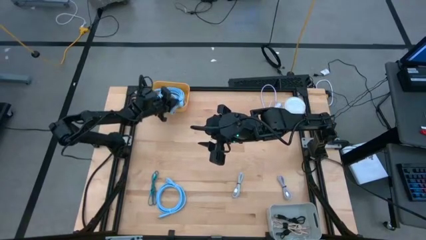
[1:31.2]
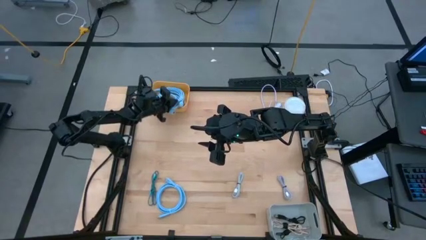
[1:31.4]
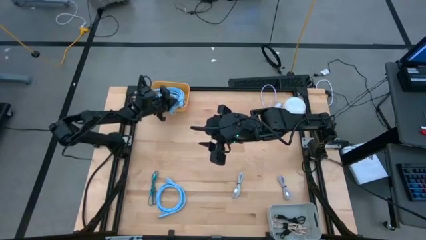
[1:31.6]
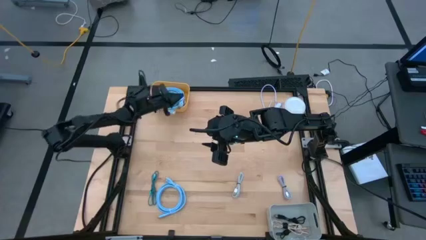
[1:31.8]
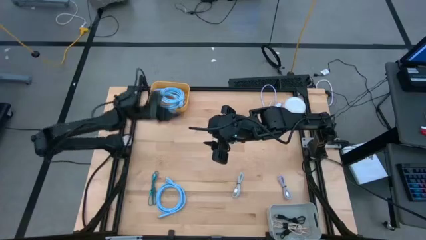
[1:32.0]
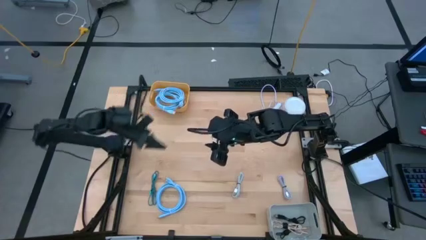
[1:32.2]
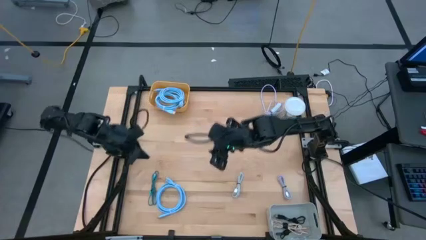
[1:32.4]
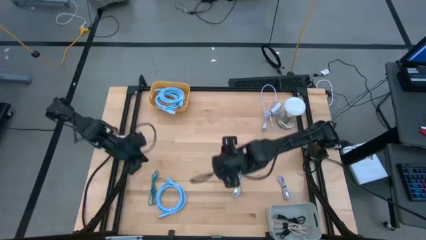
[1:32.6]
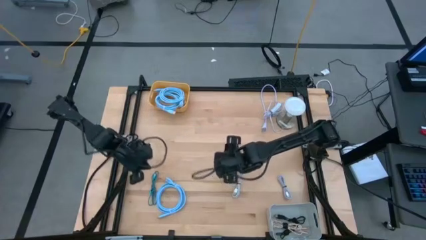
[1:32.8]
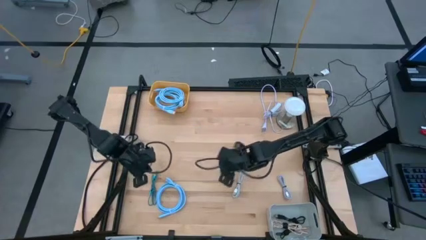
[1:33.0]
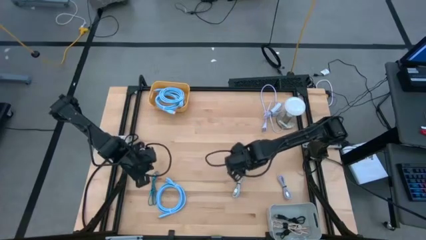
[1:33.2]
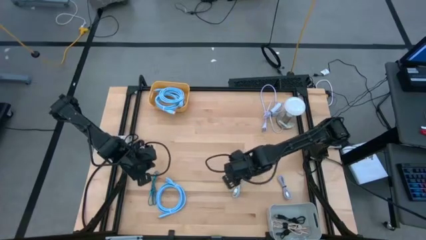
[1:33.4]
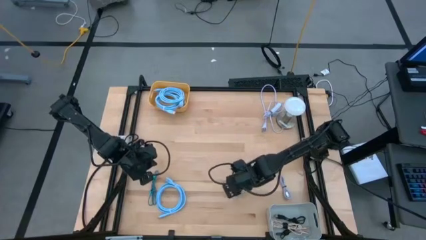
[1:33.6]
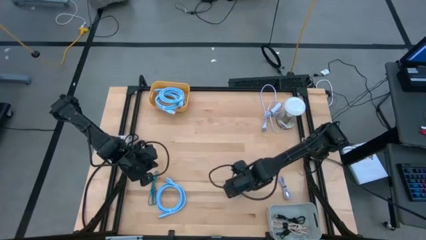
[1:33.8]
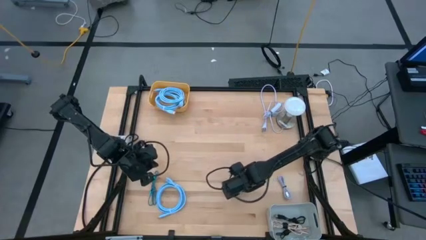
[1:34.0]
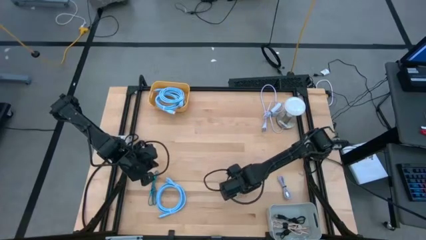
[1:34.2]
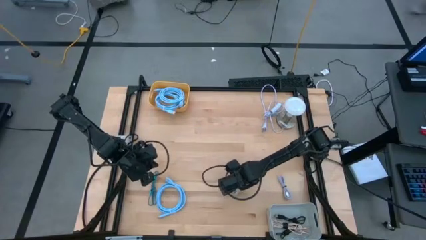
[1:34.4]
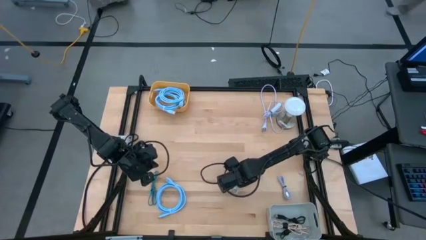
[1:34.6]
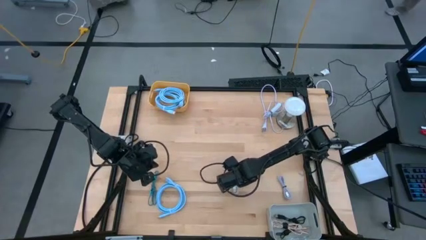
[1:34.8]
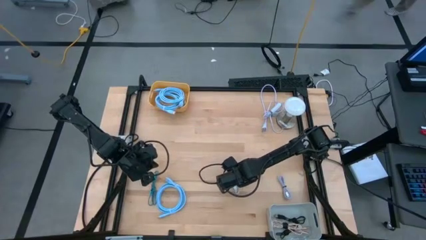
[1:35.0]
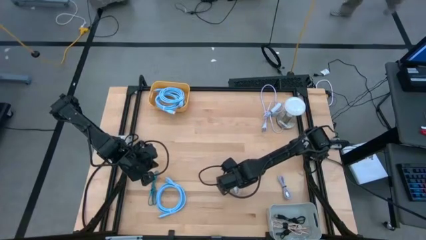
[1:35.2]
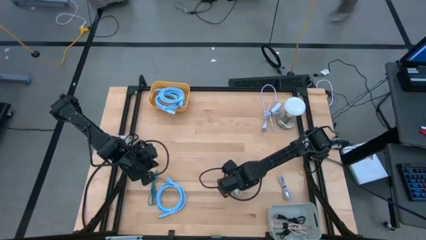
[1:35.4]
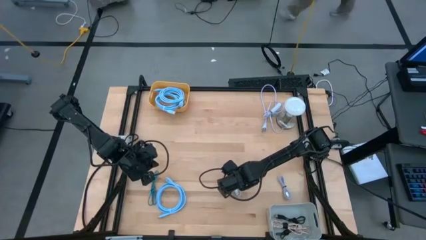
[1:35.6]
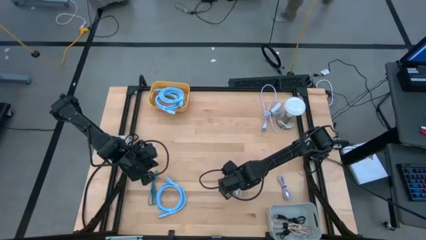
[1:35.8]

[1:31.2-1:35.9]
Task: Pick & Place USB Port
Put the white charger cable into the gray bin

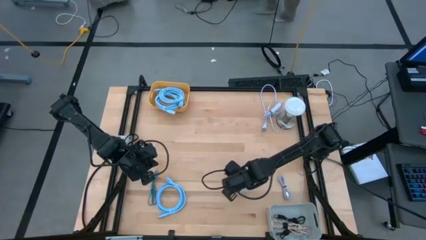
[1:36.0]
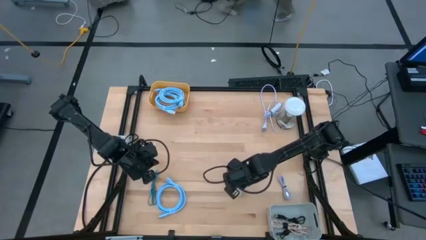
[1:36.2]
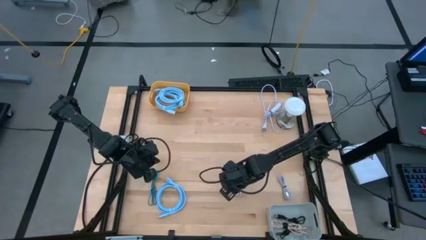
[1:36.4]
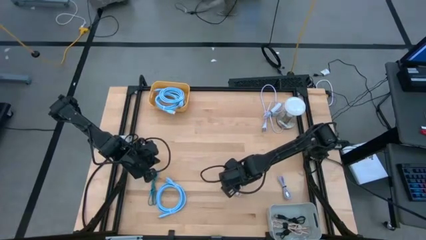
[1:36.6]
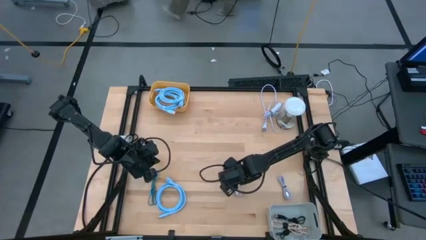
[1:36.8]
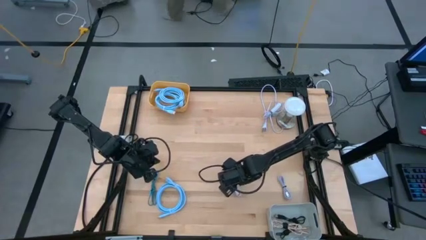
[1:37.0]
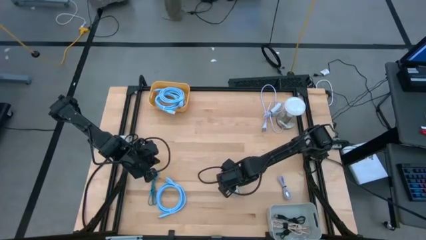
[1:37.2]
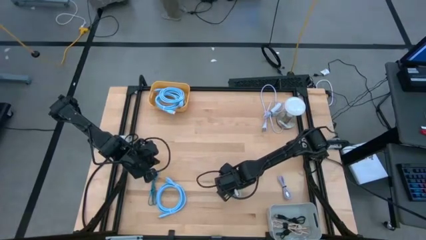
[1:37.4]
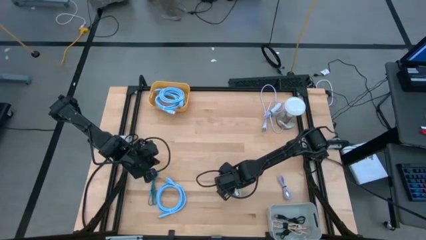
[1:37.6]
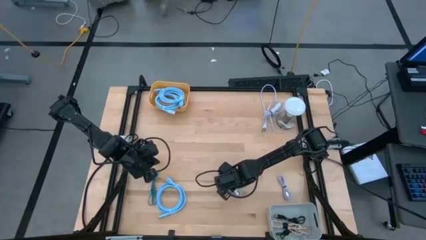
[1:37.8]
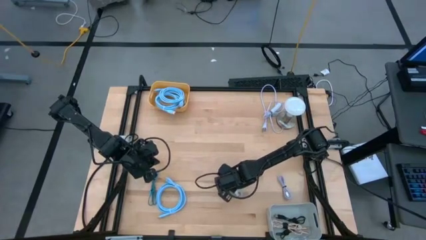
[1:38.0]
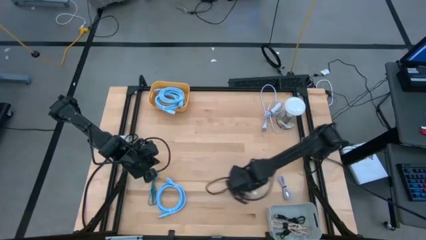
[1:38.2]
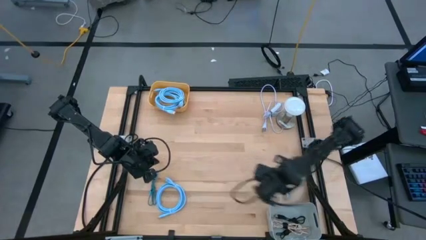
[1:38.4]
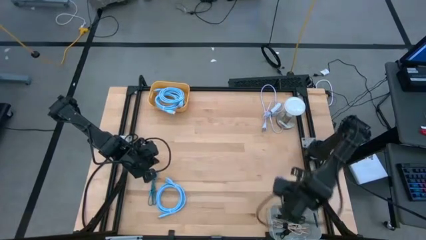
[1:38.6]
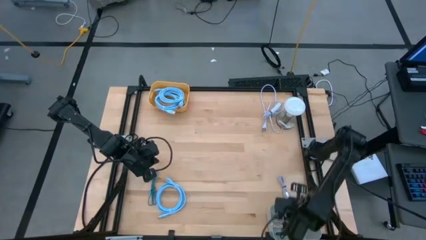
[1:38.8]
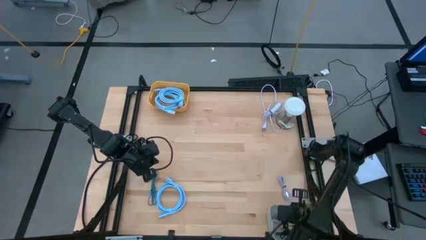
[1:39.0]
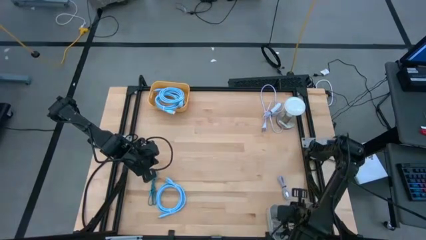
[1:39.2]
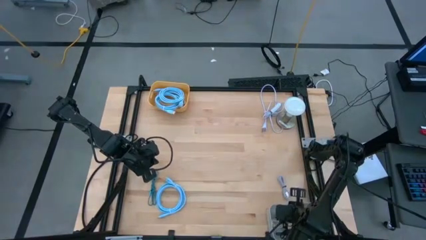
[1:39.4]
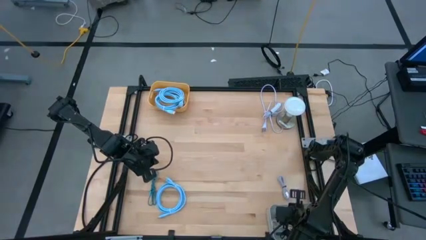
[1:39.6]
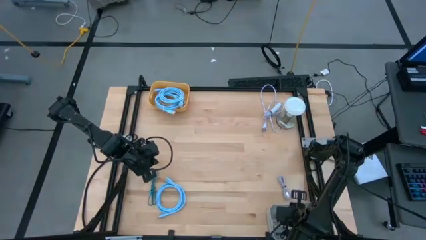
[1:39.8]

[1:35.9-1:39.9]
Put the white charger cable into the gray bin

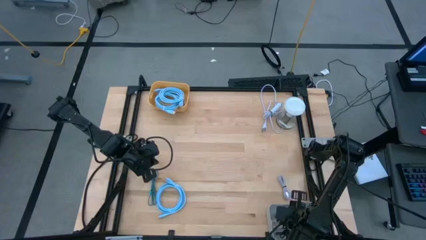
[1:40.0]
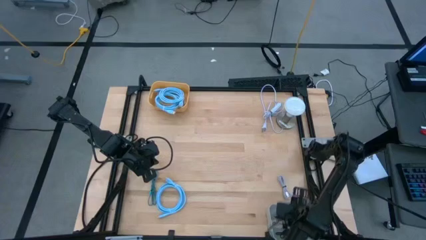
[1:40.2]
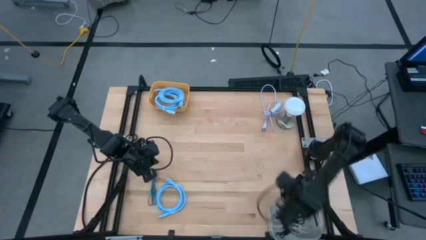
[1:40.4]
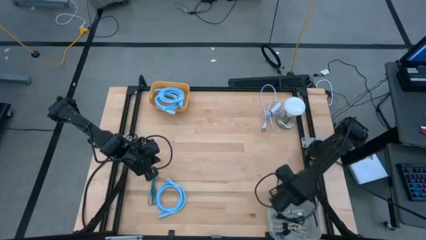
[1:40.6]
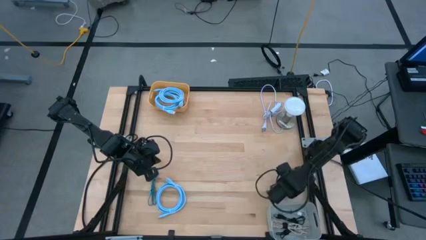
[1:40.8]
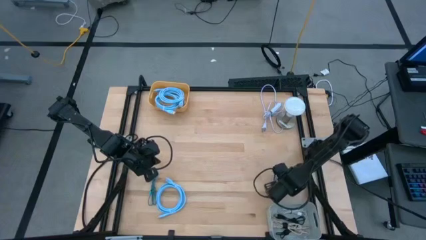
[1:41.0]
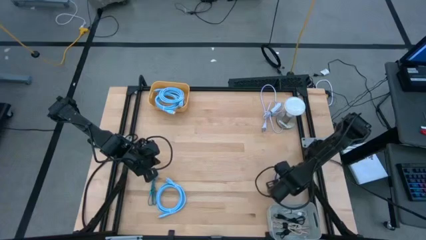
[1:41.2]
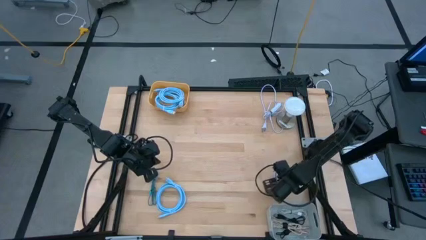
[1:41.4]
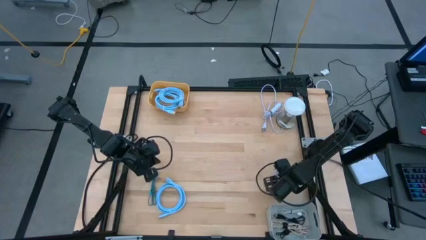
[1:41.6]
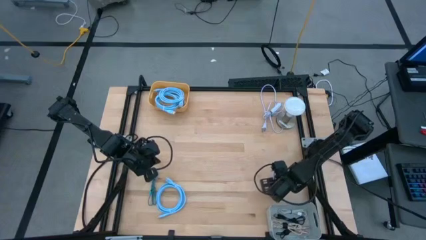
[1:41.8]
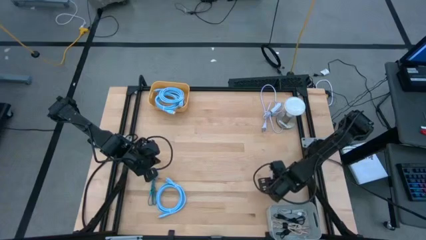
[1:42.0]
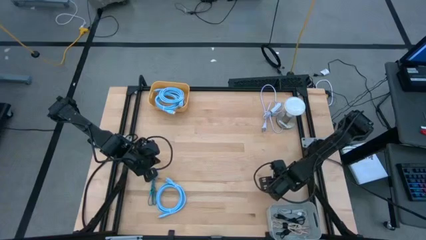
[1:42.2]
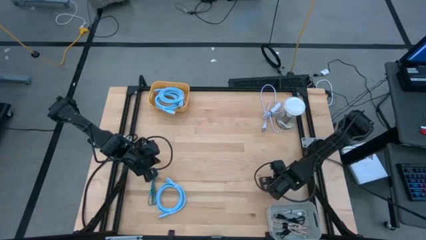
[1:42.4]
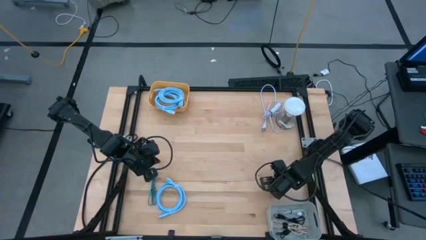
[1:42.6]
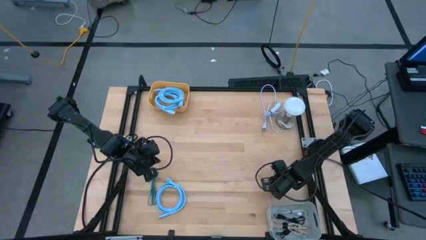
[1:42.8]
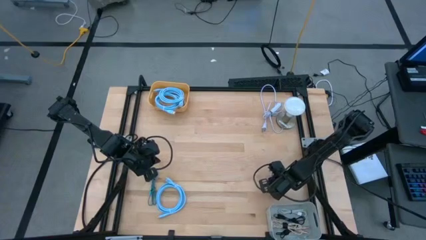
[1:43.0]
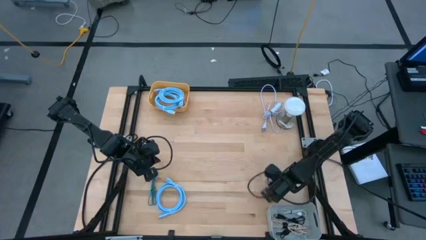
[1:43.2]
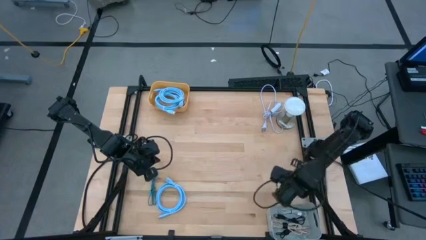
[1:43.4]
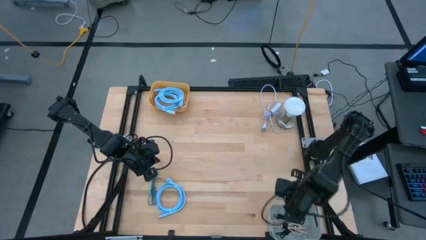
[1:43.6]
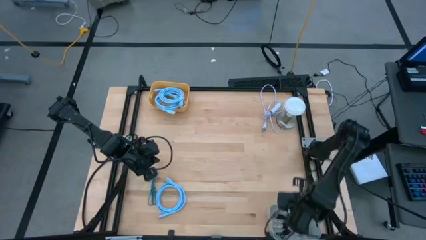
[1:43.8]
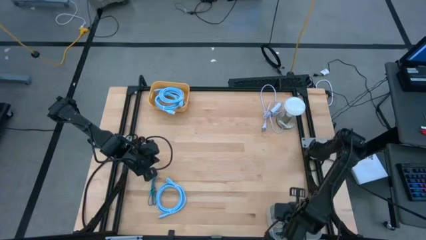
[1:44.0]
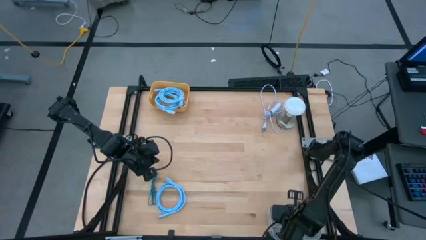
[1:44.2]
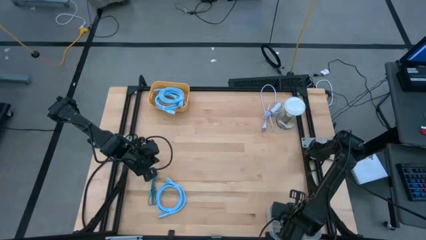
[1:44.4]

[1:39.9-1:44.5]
Put the purple charger cable into the gray bin

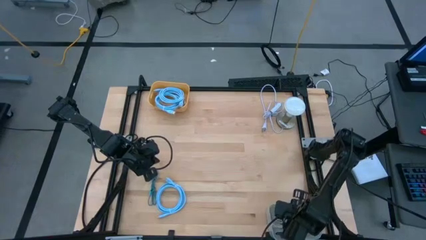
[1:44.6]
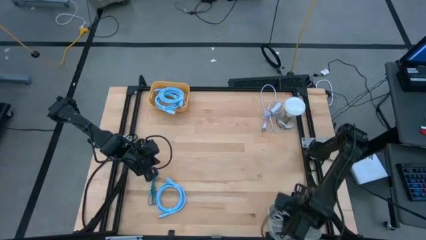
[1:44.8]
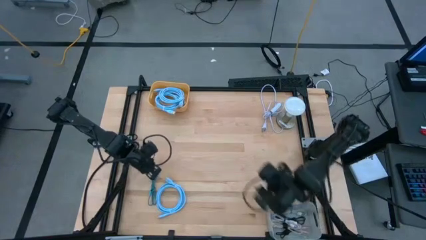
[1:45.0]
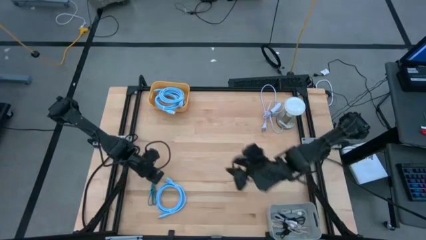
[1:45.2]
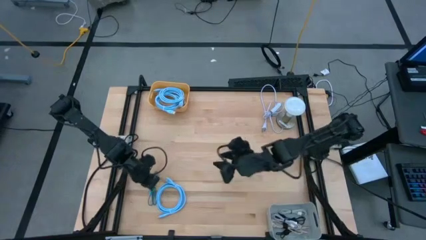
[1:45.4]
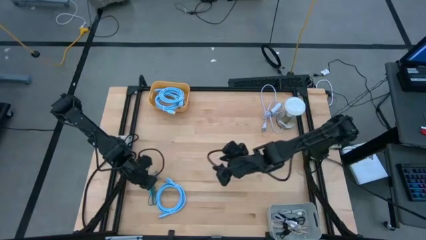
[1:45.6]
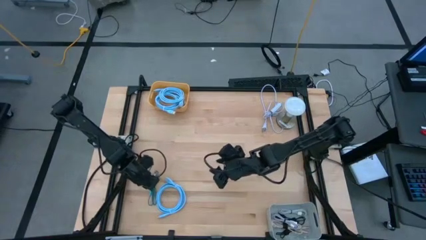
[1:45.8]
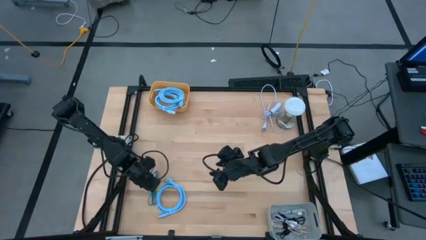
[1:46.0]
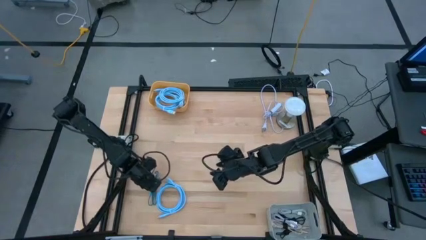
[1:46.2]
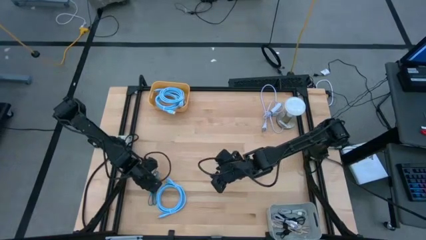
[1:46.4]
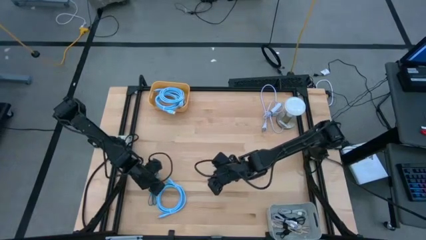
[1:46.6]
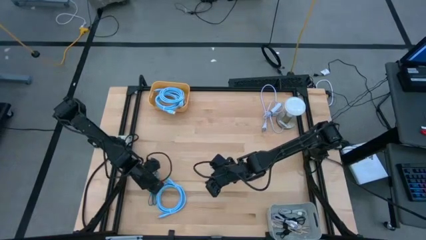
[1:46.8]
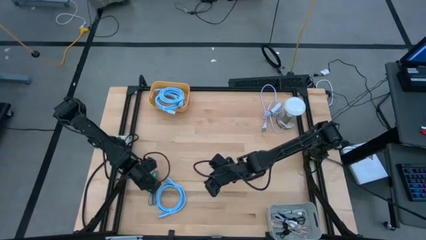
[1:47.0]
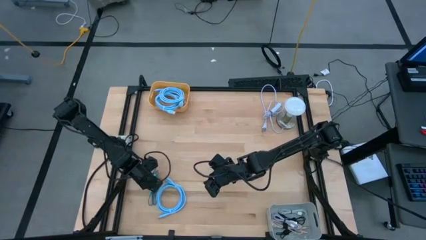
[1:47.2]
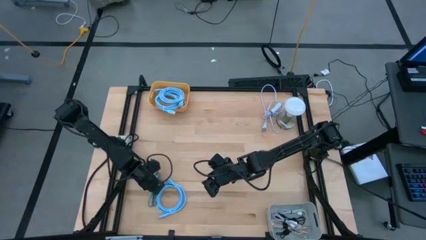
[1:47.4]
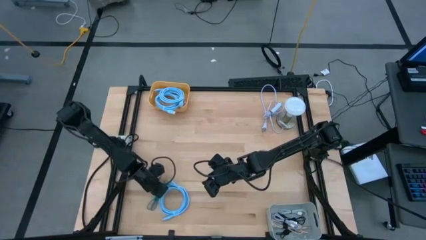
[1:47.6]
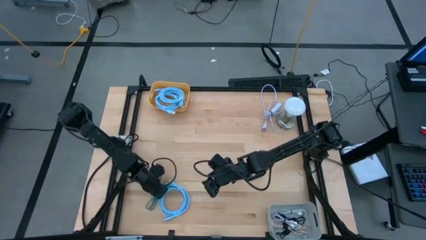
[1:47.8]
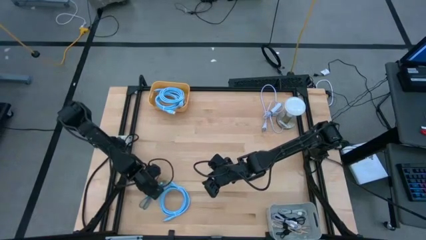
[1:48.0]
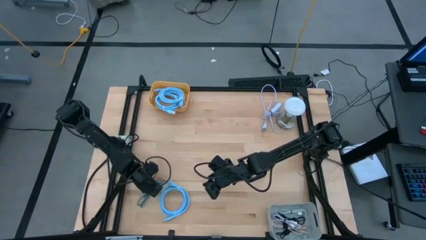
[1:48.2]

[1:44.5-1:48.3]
Put the blue charger cable into the gray bin
